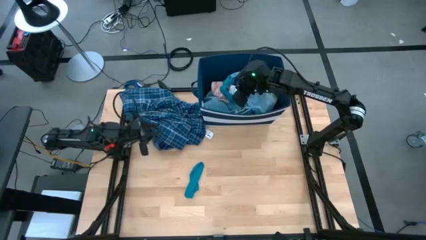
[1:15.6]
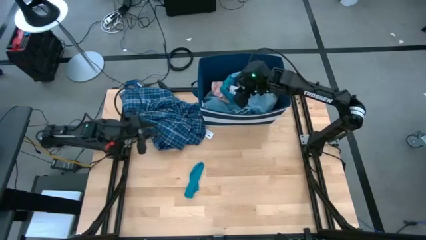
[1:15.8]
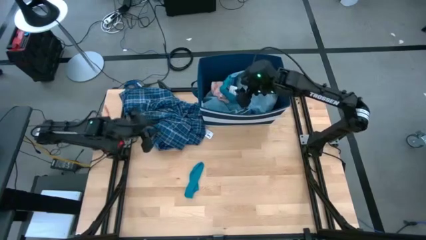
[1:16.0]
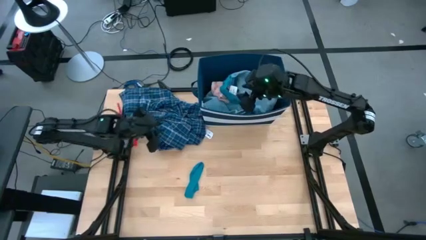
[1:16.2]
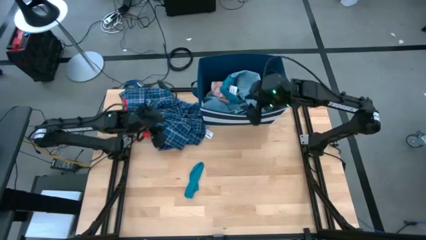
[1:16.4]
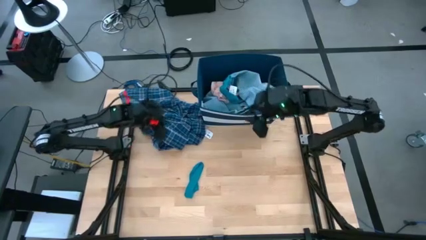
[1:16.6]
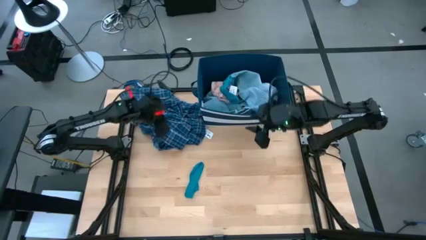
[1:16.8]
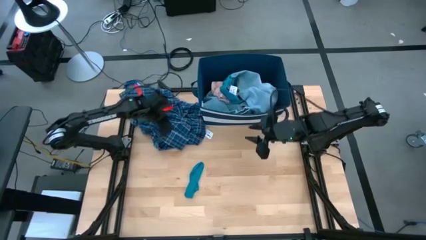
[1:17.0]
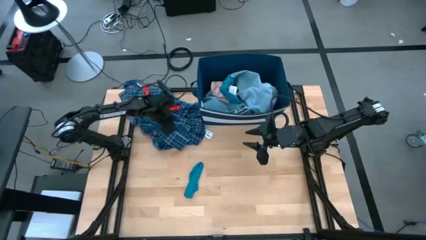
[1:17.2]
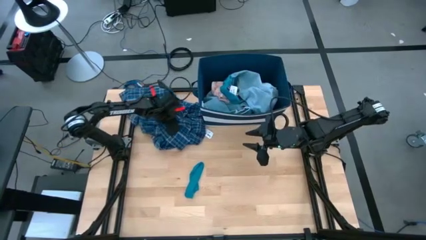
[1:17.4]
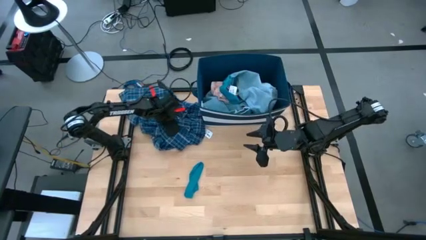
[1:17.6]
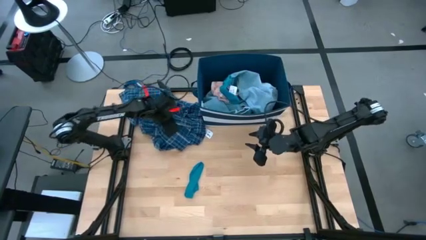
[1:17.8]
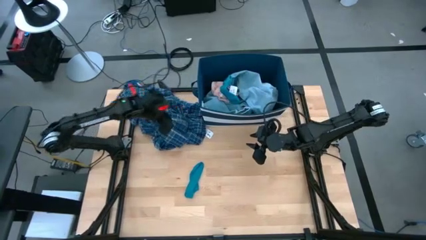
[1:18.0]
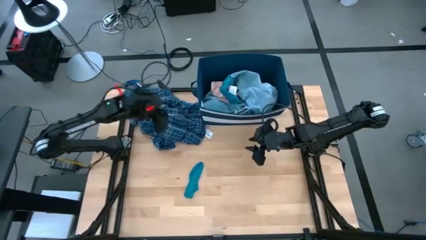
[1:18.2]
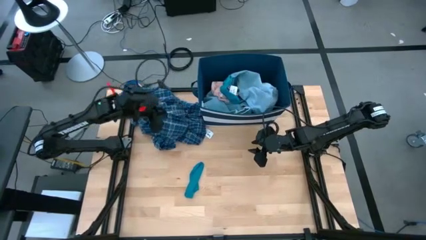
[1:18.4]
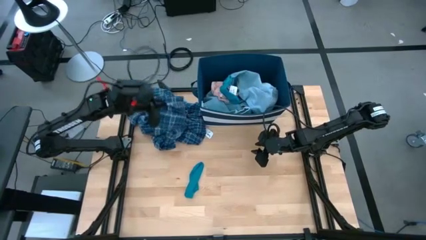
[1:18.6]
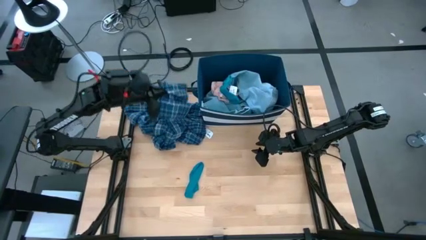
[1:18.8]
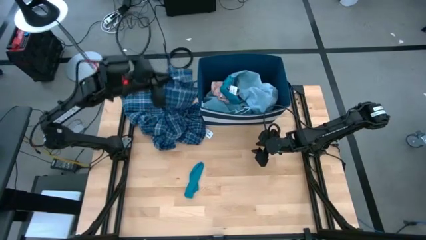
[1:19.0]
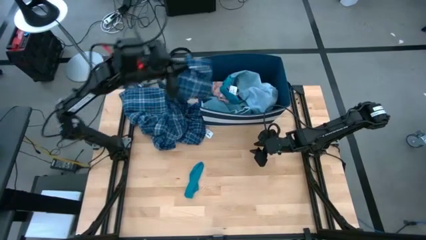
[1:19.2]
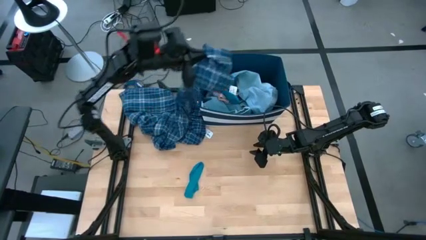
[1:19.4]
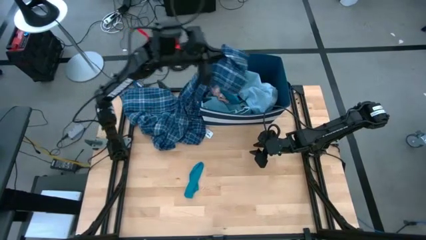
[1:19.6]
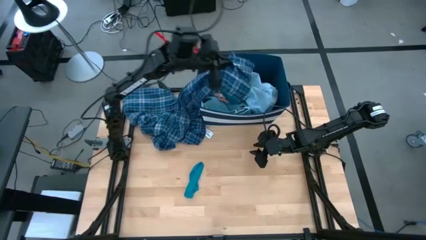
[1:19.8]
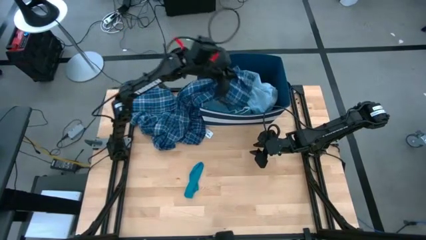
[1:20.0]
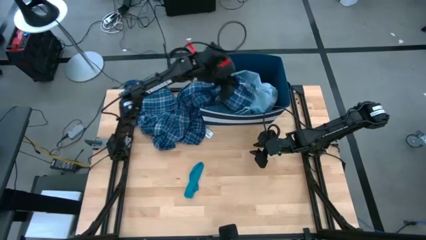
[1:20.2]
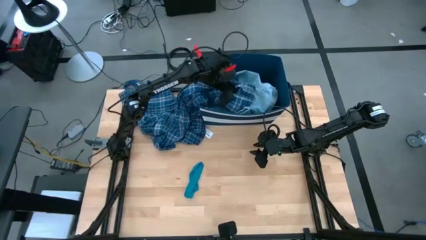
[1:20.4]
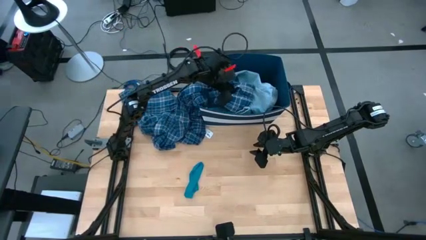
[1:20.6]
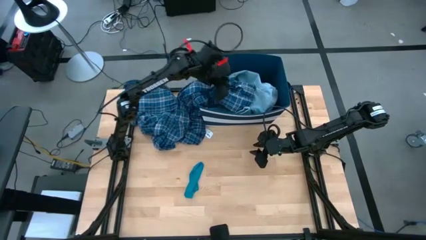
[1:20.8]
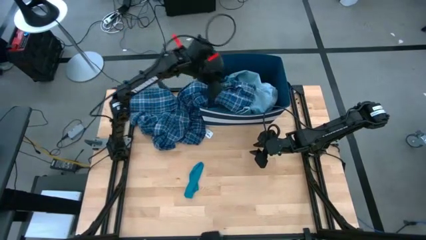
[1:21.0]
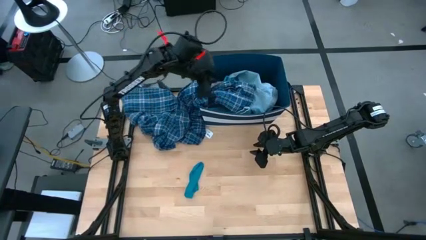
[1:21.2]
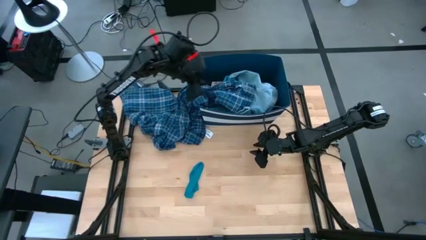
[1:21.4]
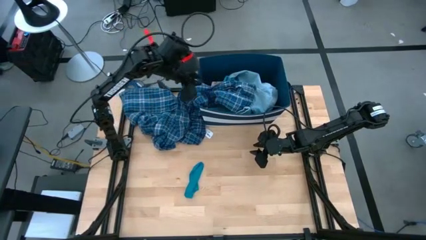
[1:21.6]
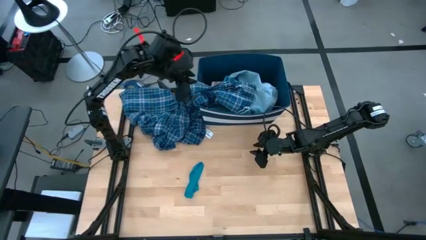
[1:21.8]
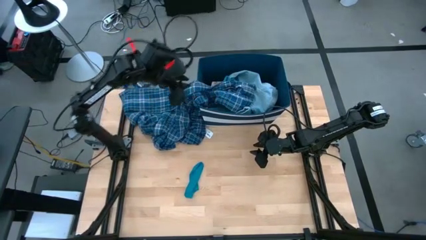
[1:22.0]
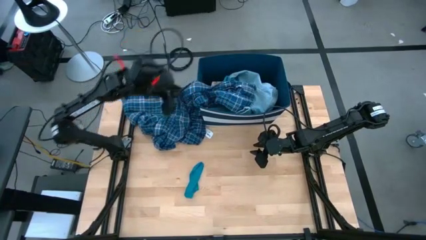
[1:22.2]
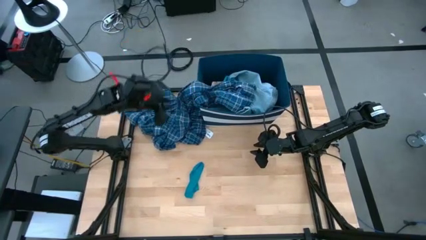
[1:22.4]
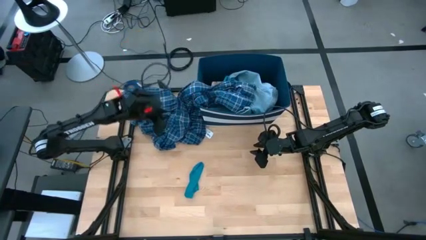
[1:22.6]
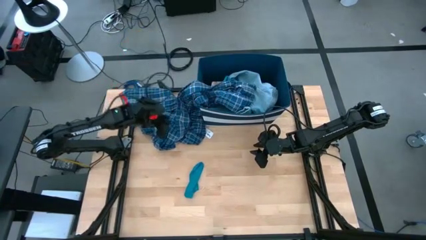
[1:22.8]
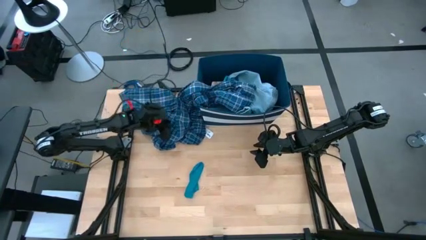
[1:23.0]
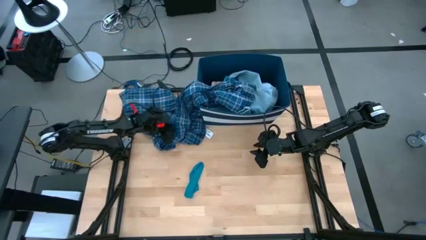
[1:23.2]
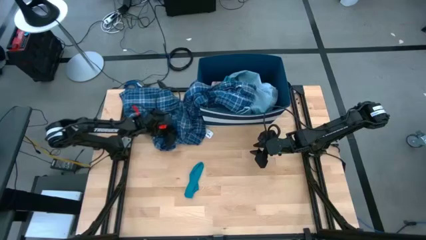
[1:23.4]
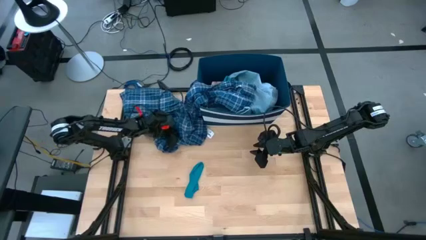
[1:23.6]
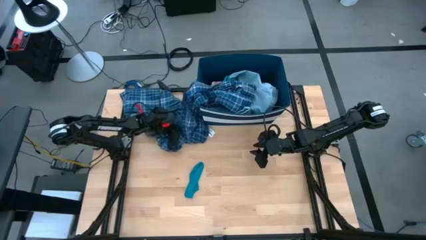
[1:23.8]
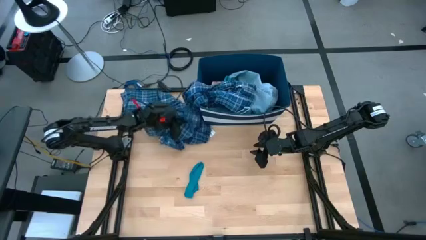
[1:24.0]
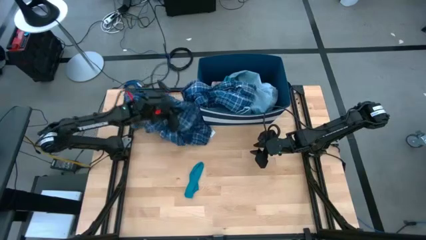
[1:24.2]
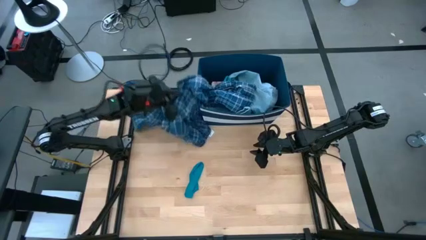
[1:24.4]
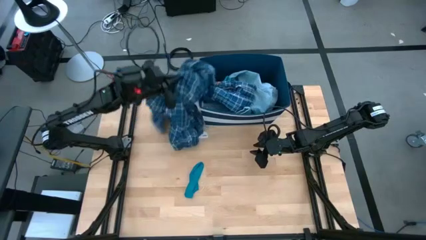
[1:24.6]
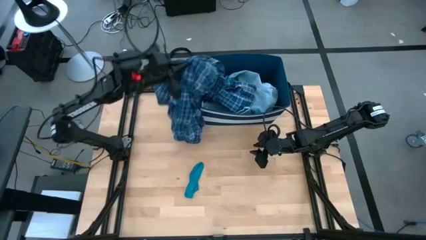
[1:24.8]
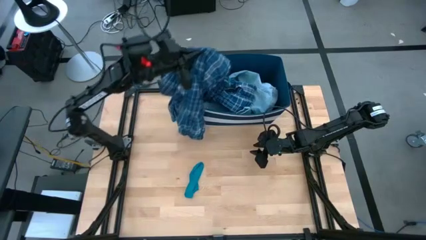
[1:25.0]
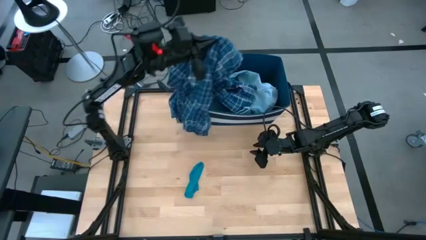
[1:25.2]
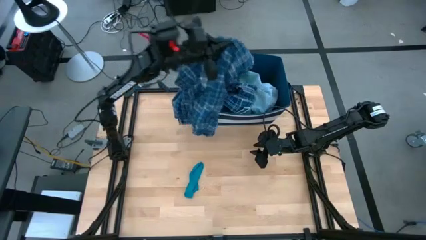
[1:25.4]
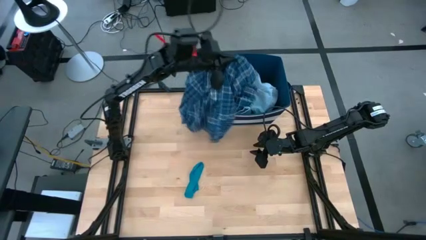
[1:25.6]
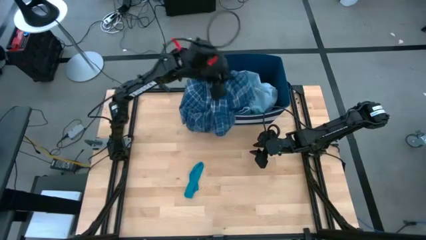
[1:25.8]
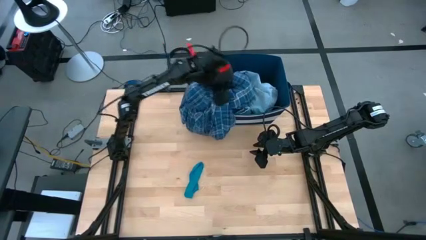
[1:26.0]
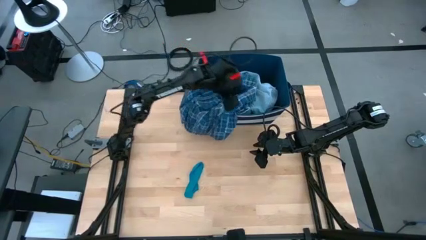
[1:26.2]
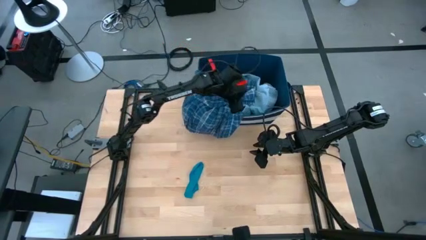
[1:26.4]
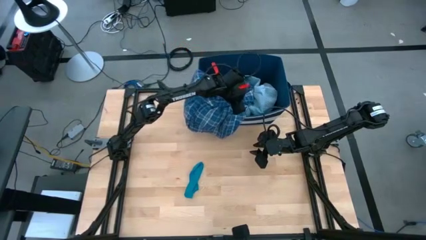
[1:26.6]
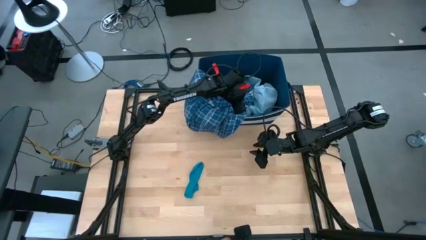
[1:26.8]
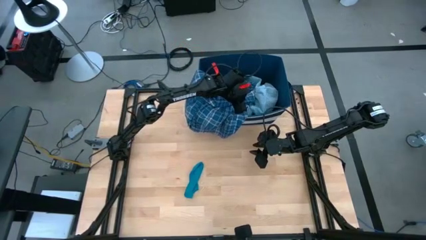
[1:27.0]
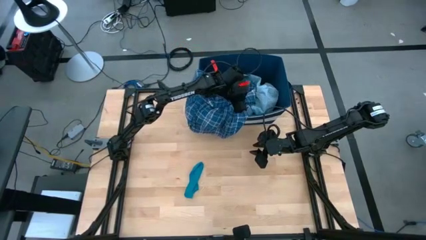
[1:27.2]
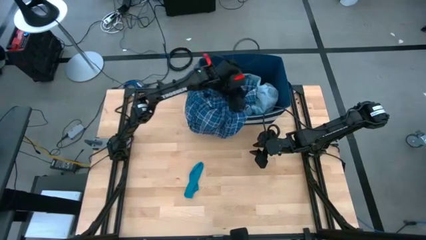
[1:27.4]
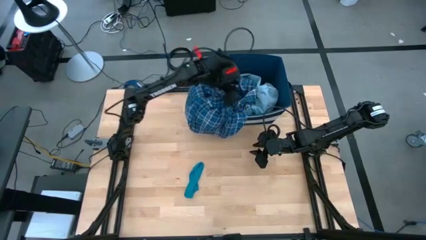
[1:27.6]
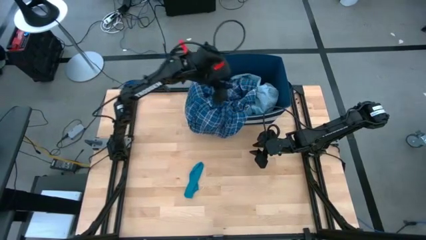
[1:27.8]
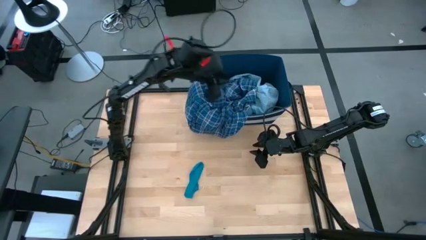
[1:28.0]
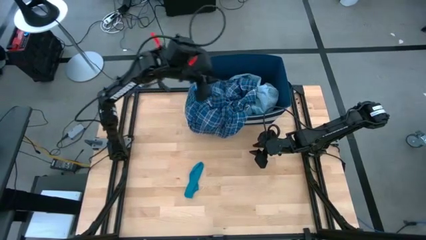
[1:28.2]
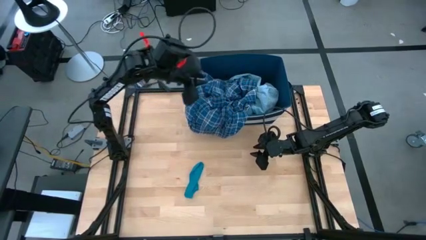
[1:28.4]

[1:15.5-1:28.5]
Task: Sort clothes
Put the blue shirt into the blue laundry bin
